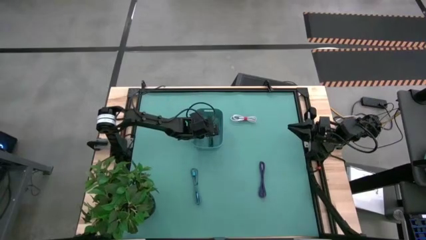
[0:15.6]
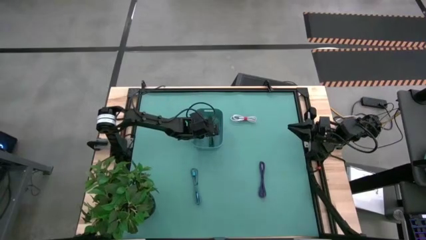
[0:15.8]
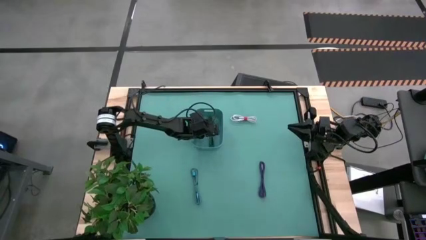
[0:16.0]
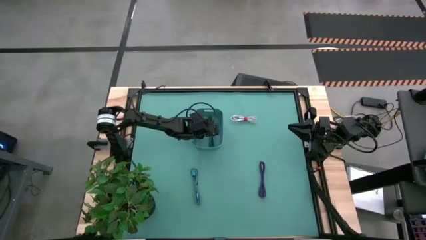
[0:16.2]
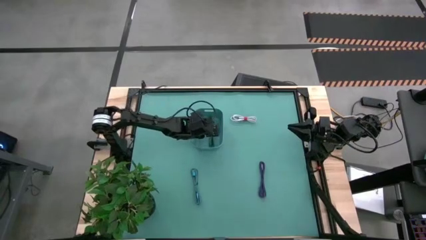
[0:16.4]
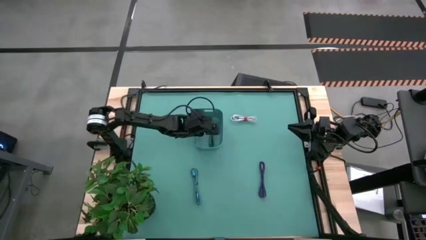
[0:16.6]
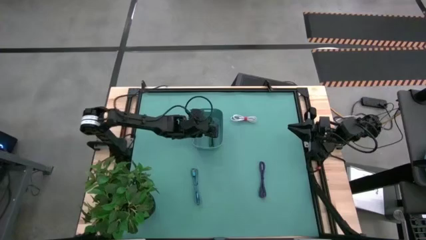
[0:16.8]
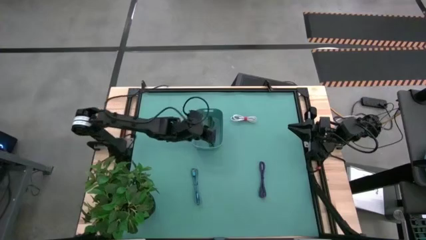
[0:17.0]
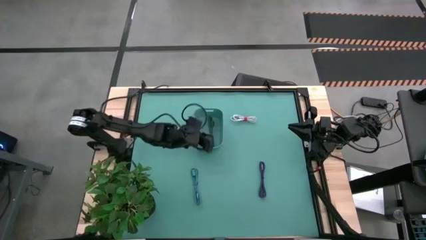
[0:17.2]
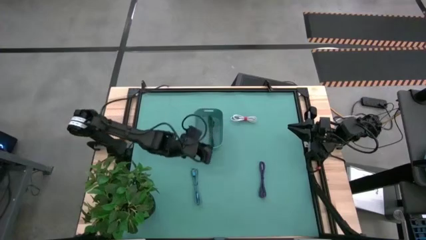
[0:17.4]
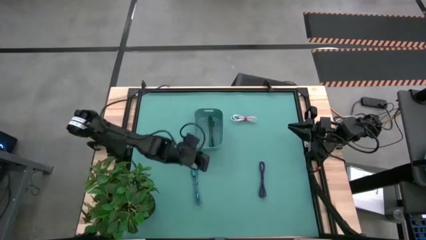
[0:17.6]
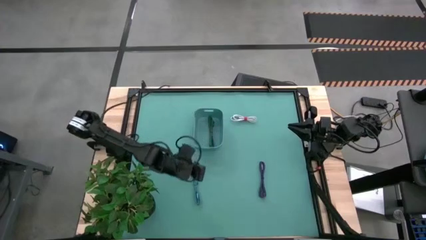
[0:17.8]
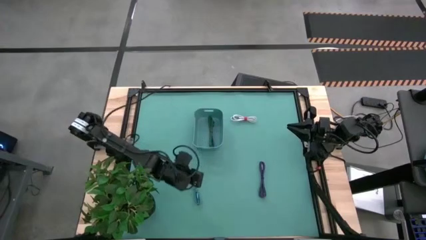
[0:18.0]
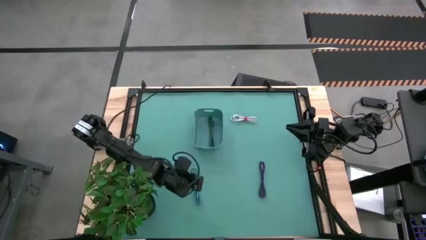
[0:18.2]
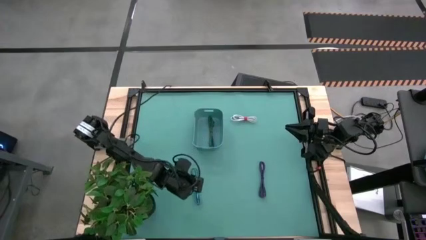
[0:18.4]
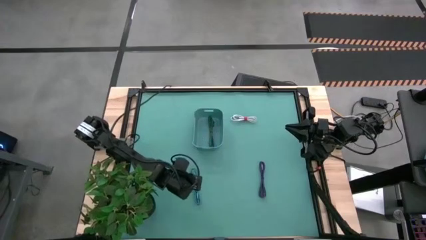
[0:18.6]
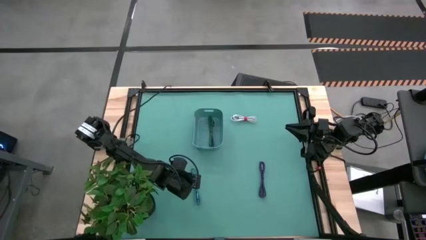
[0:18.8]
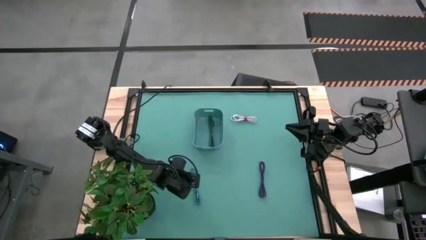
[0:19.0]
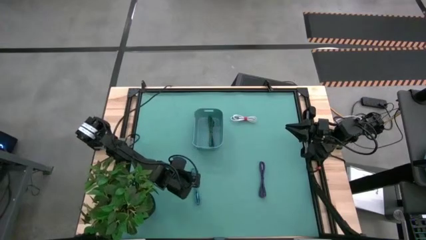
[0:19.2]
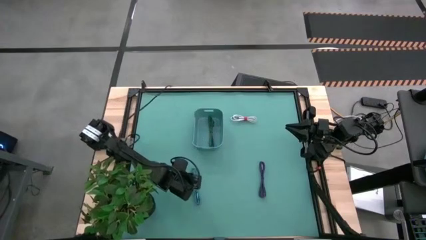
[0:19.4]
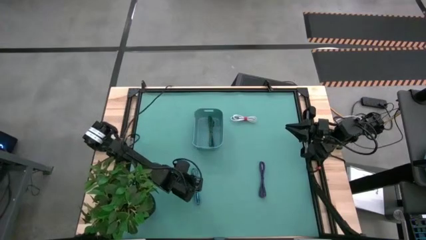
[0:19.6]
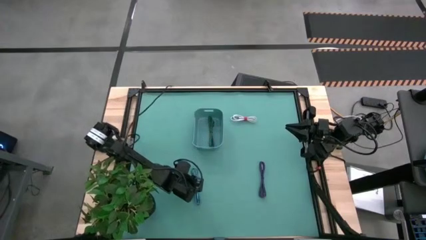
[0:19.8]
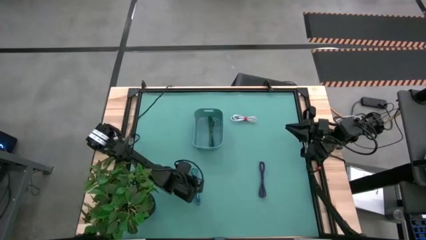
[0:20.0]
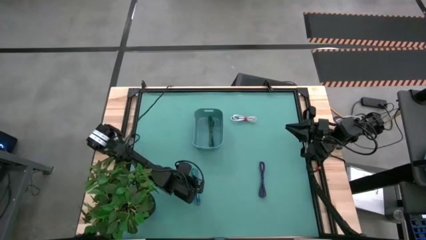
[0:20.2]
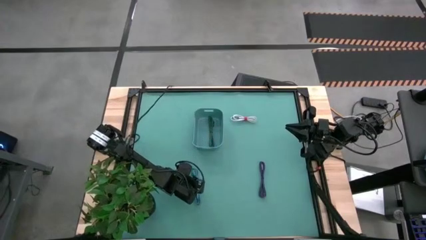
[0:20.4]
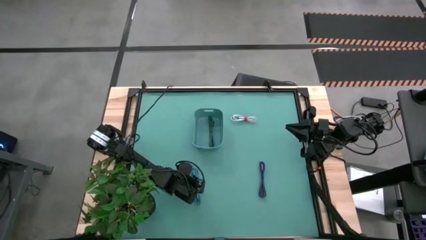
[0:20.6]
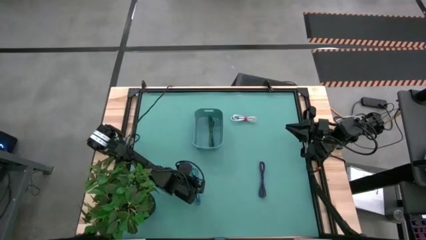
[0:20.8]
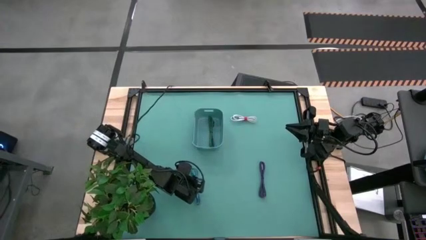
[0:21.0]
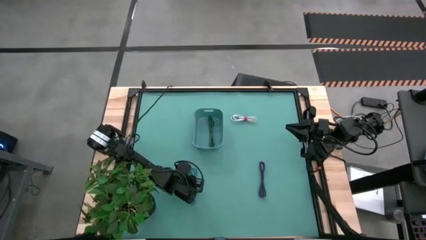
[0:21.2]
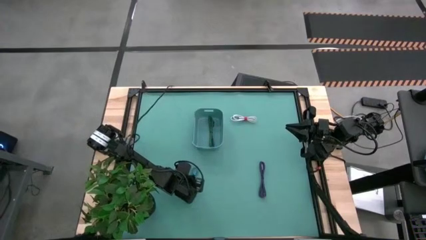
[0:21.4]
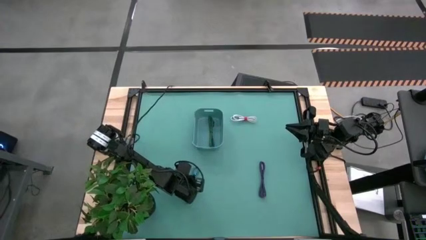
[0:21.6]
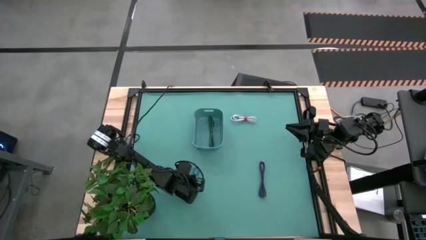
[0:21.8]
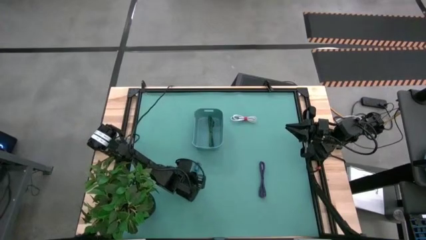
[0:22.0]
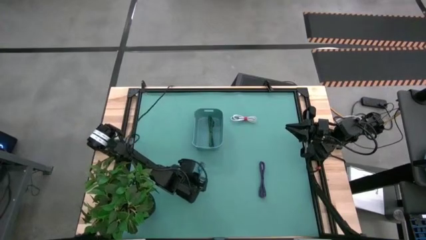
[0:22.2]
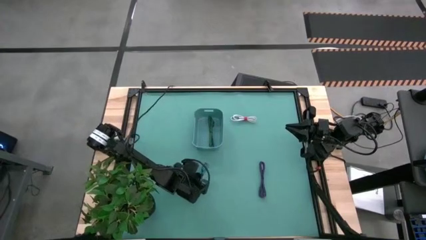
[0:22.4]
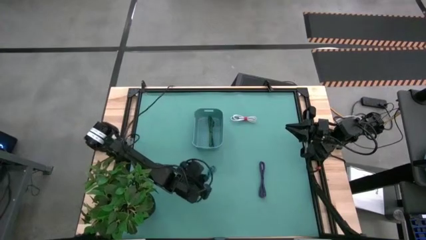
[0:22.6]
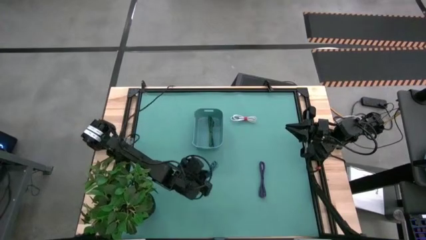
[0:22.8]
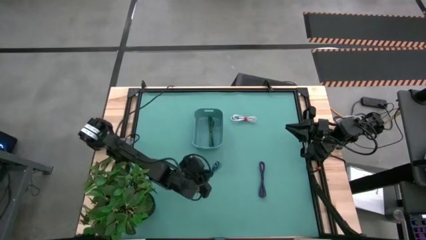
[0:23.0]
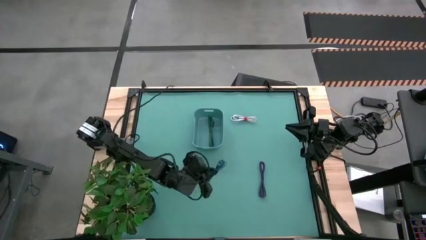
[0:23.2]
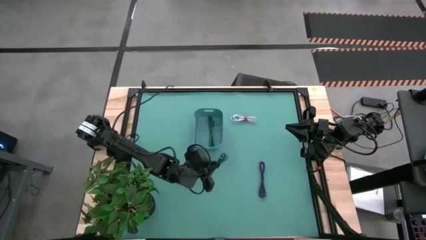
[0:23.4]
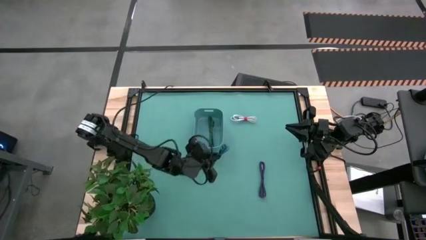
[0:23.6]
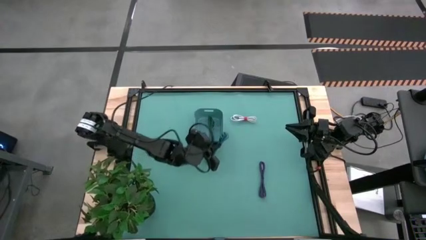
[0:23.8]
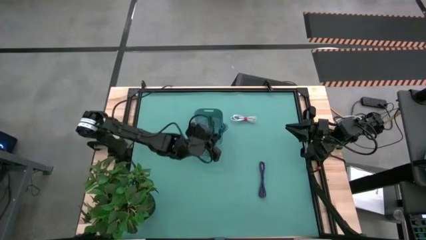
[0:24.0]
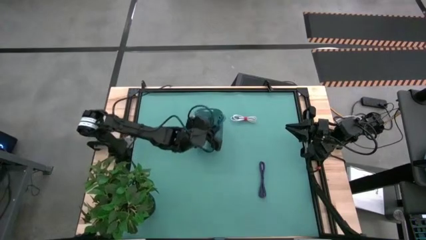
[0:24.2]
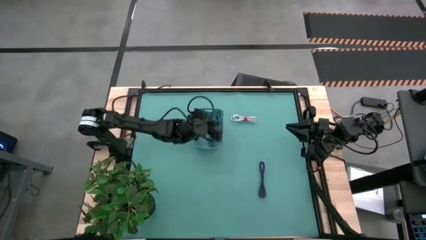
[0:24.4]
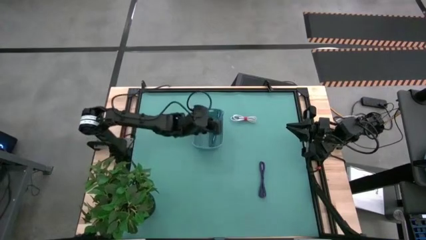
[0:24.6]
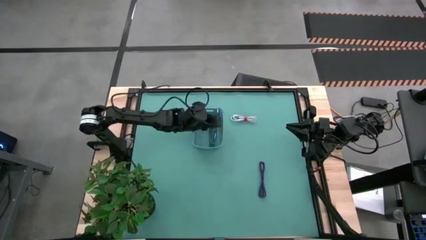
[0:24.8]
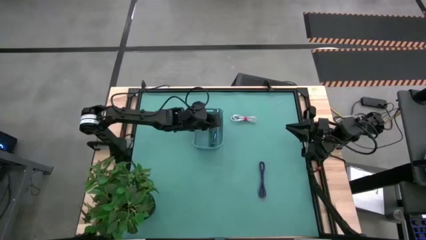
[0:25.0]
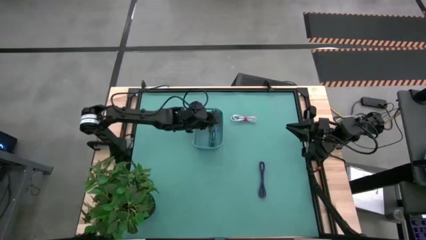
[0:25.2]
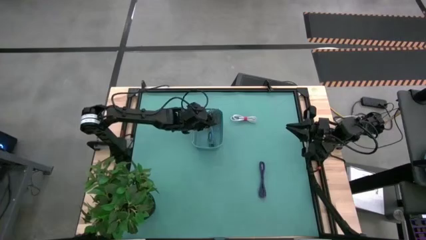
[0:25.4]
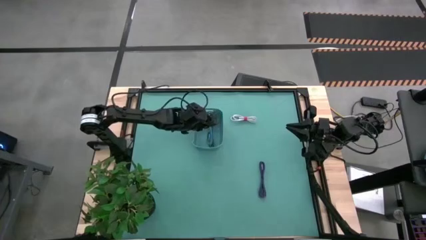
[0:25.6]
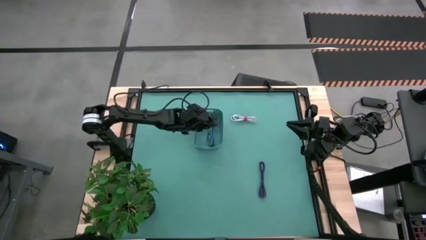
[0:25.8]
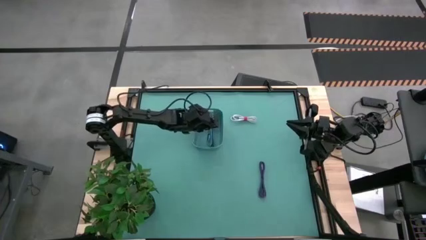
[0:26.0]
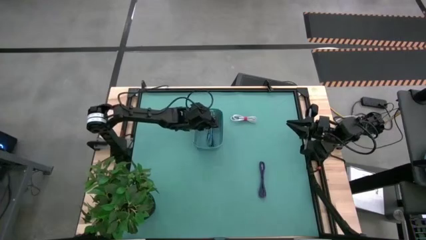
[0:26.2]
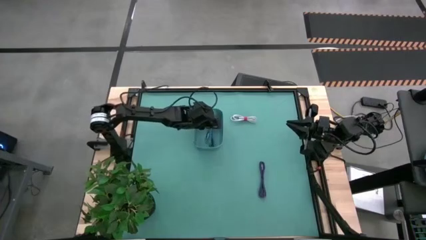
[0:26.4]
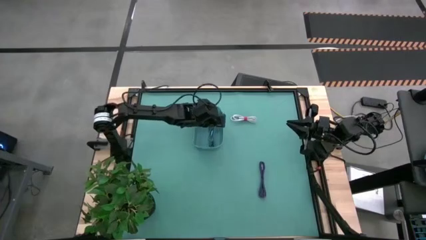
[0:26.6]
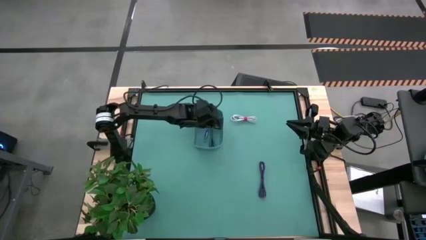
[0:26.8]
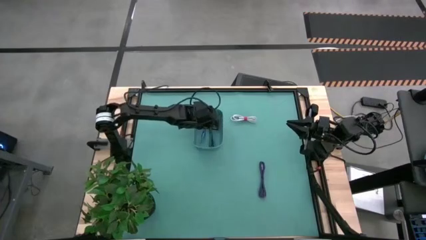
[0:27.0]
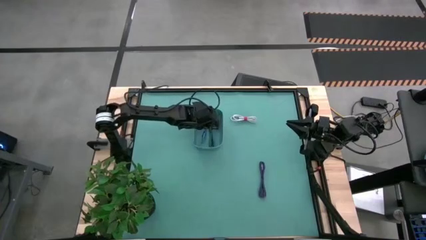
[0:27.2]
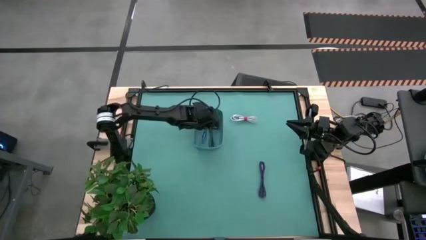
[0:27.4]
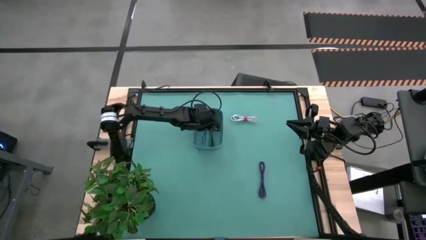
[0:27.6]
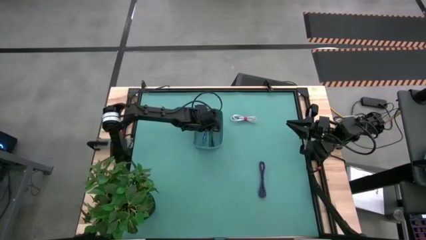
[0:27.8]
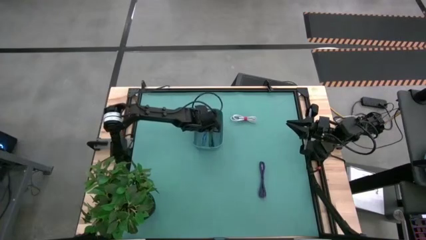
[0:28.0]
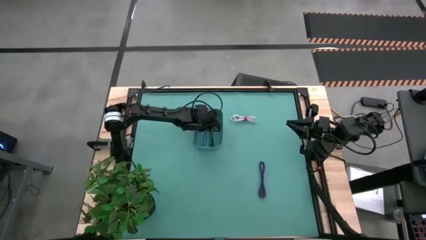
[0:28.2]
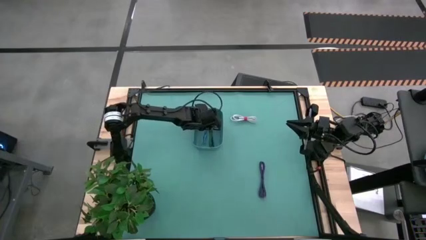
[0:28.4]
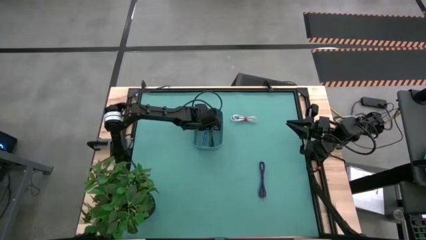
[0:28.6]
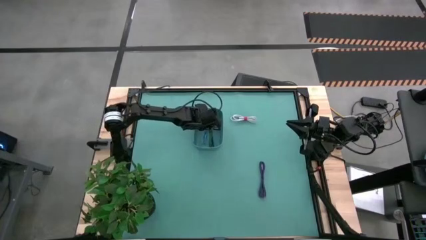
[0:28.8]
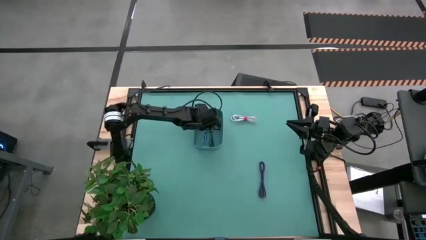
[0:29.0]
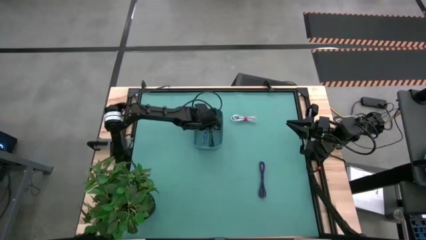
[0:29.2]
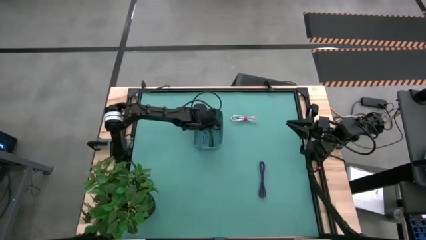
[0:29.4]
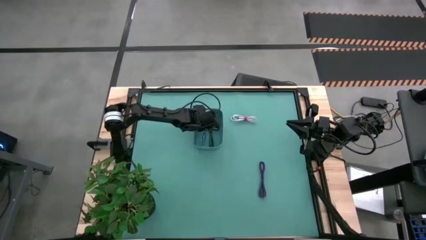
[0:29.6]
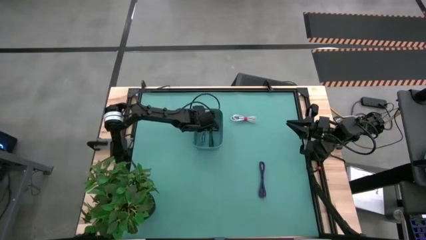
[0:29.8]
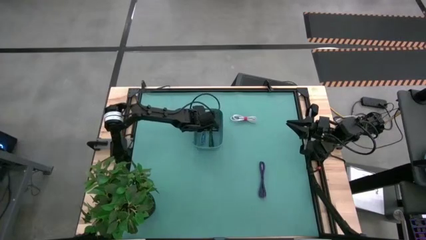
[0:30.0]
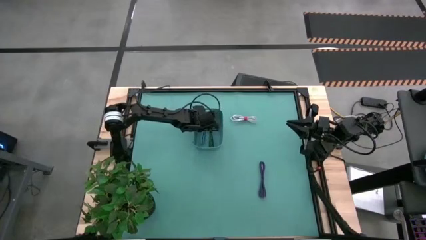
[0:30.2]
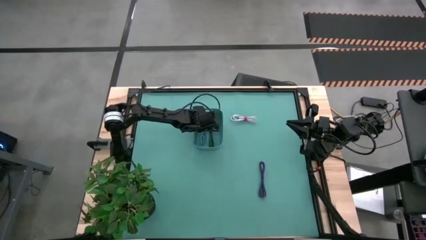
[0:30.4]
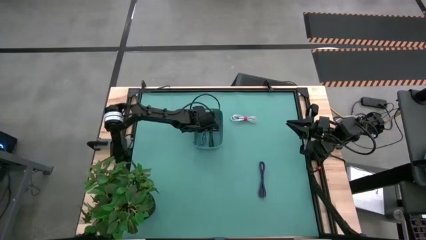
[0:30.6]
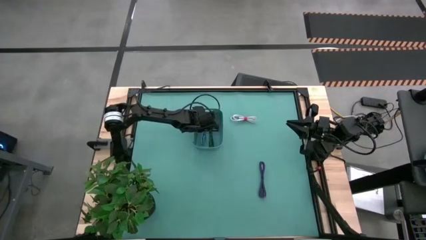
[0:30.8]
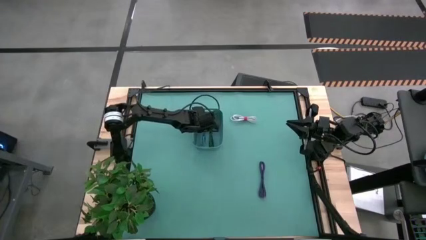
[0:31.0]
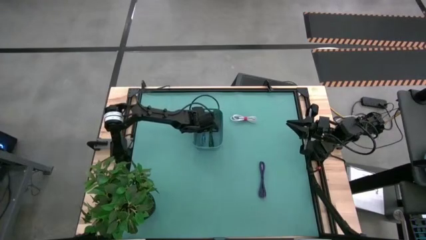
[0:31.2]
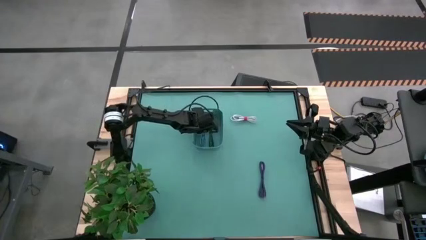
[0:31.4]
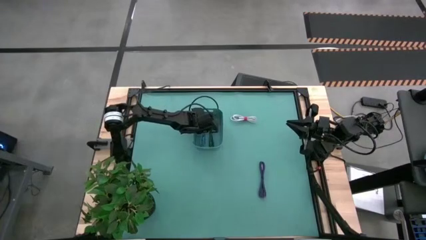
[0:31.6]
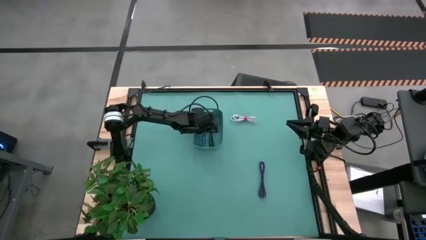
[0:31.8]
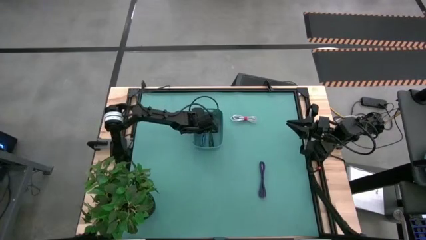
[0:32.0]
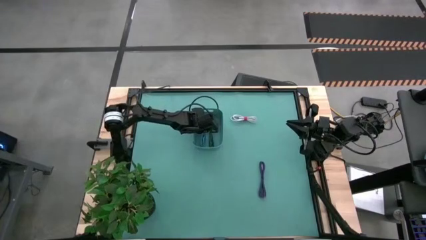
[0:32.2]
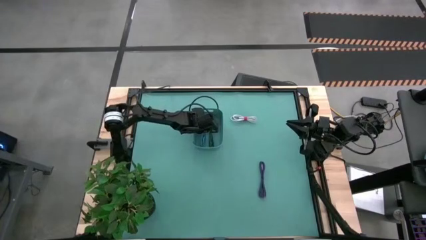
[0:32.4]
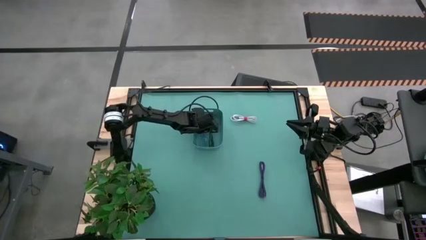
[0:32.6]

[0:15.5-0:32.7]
Task: Pick and place USB-C Cables
Put the blue white charger cable into the bin
